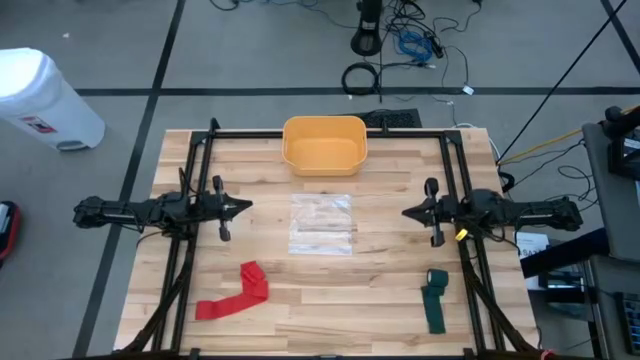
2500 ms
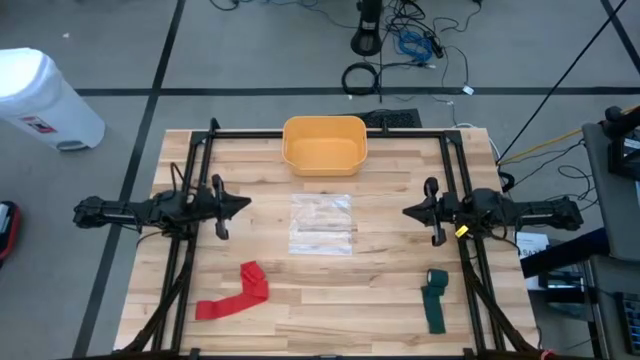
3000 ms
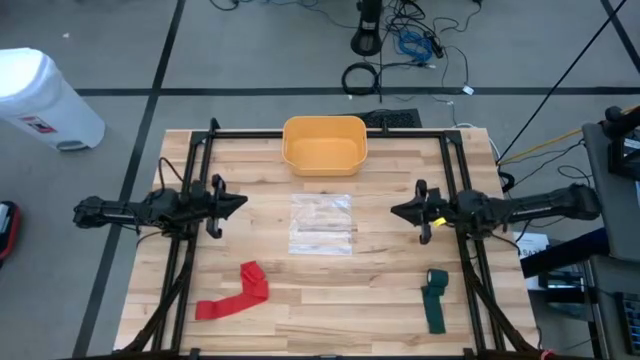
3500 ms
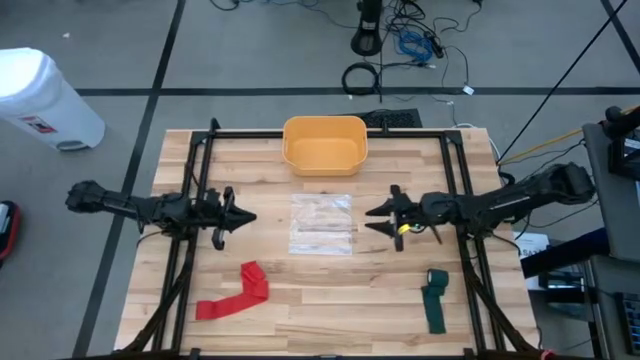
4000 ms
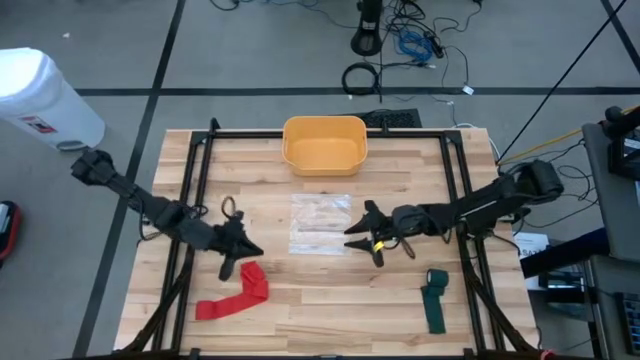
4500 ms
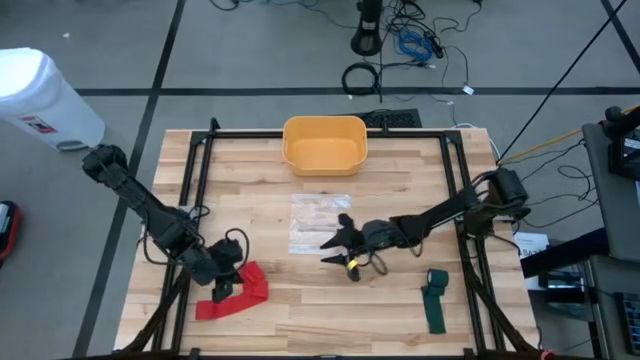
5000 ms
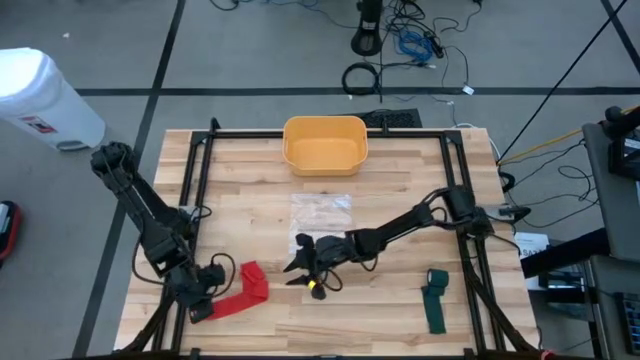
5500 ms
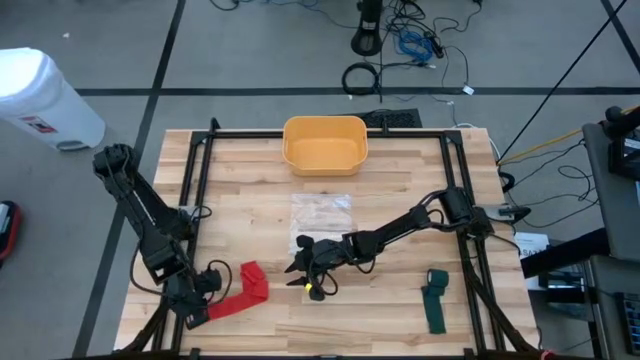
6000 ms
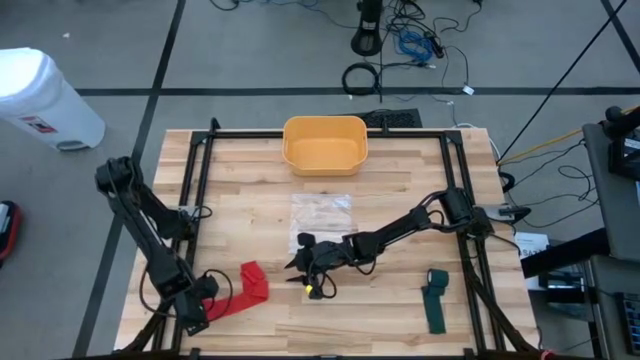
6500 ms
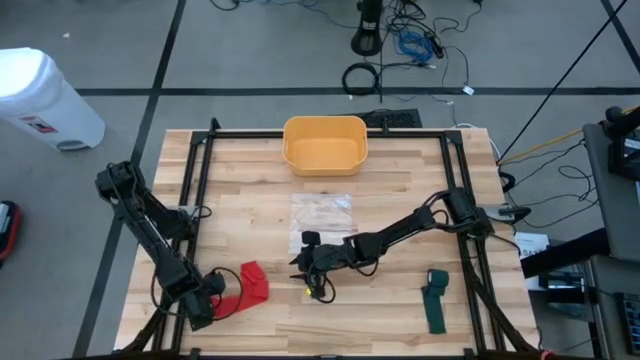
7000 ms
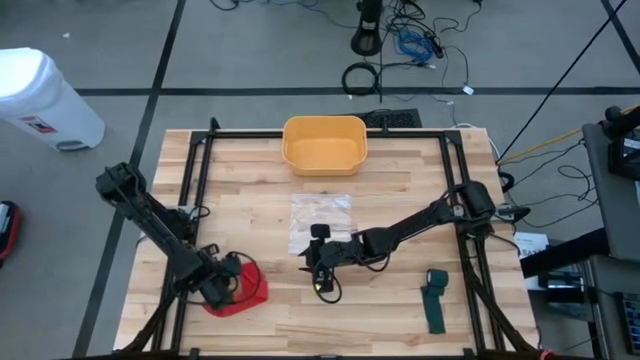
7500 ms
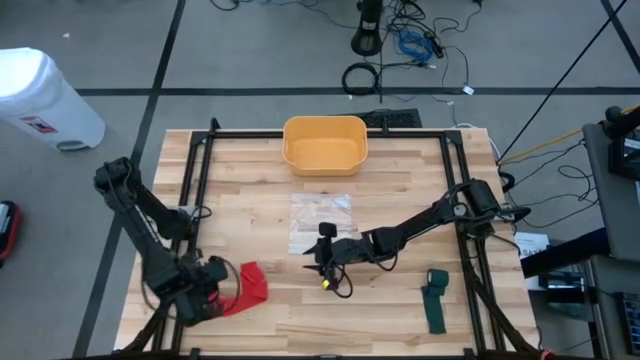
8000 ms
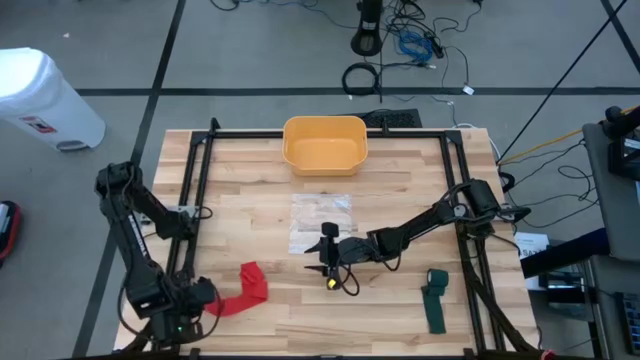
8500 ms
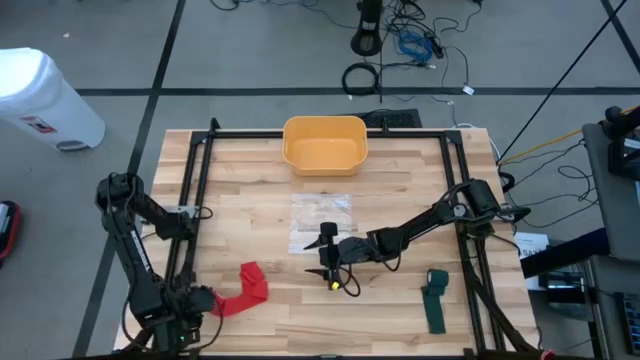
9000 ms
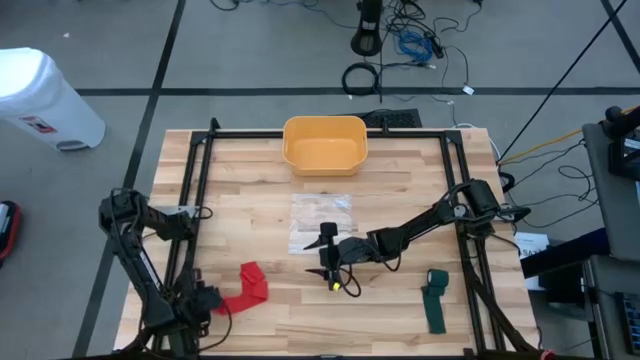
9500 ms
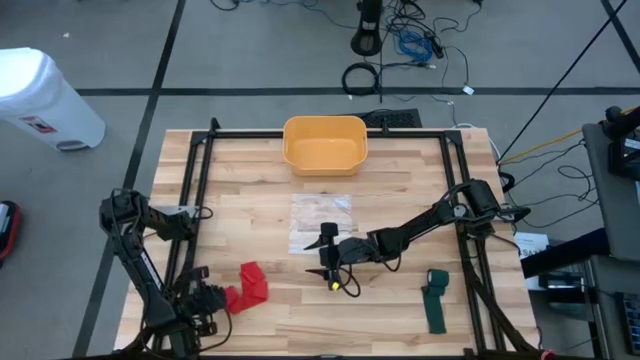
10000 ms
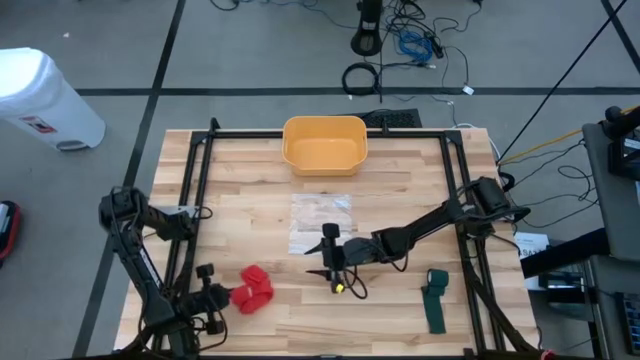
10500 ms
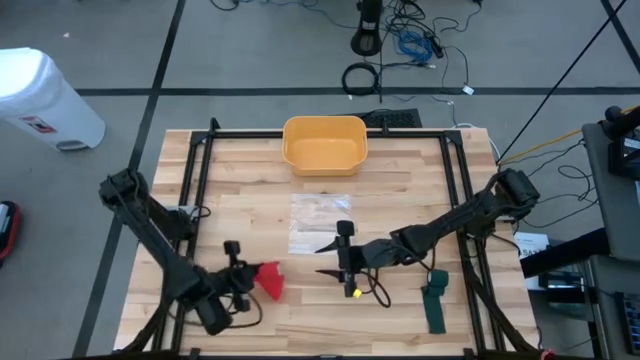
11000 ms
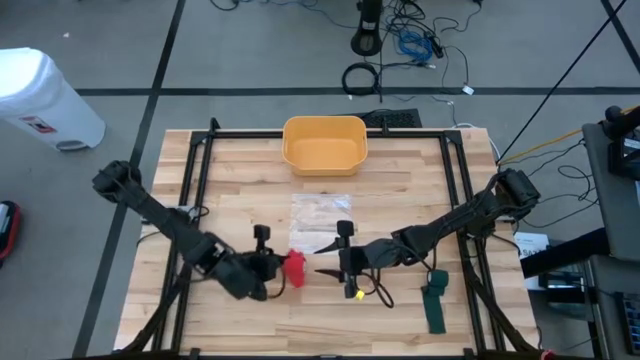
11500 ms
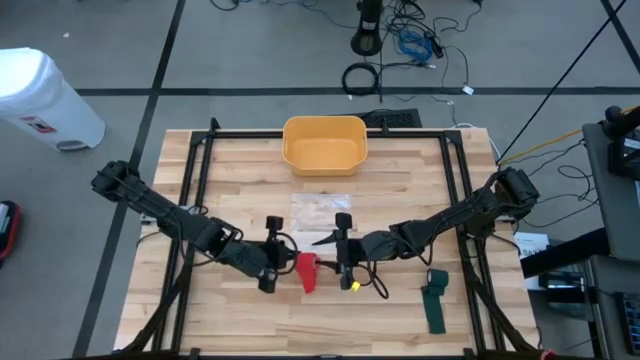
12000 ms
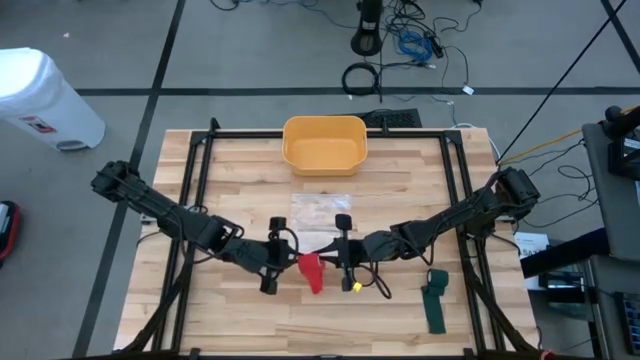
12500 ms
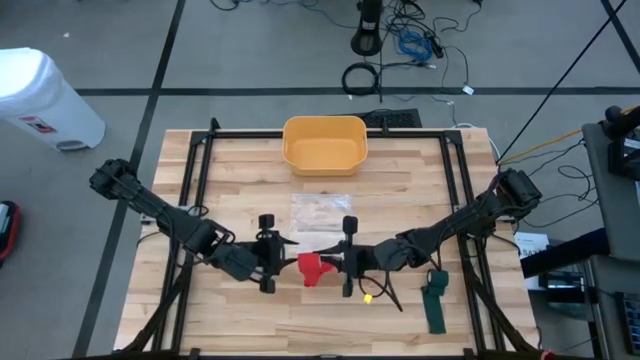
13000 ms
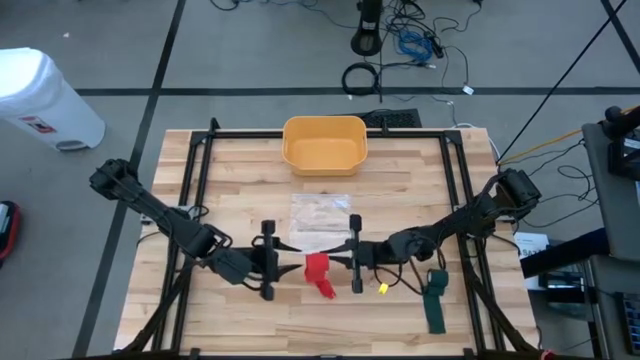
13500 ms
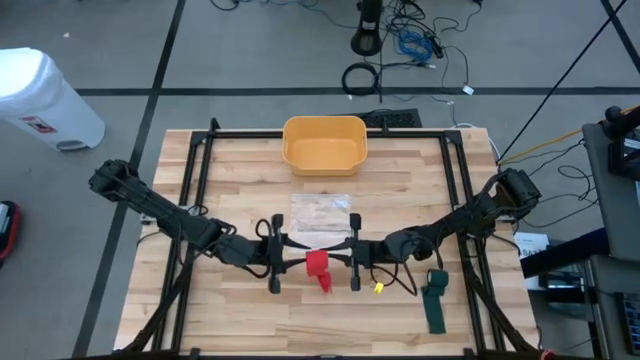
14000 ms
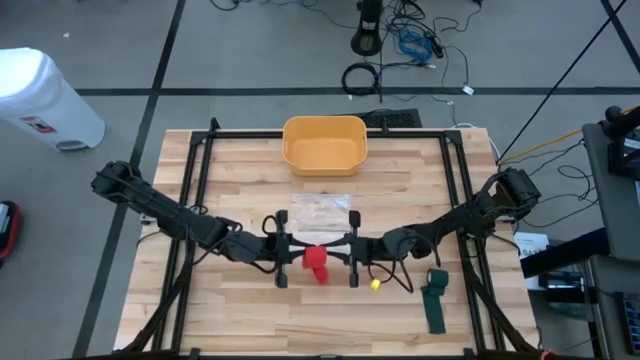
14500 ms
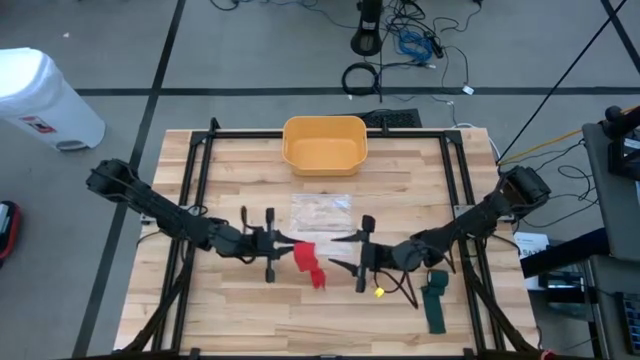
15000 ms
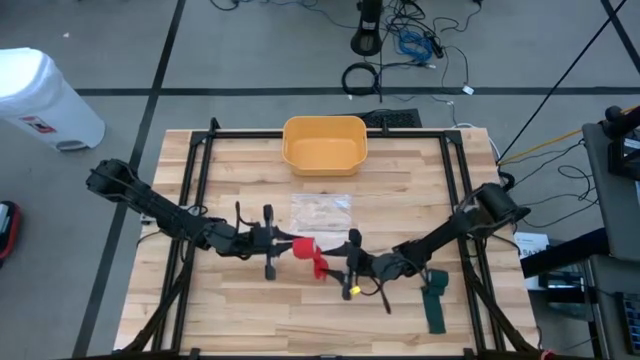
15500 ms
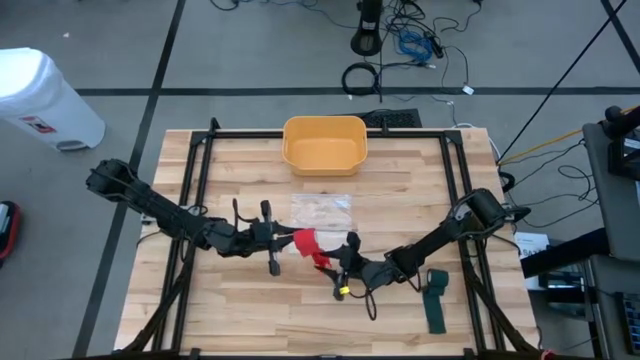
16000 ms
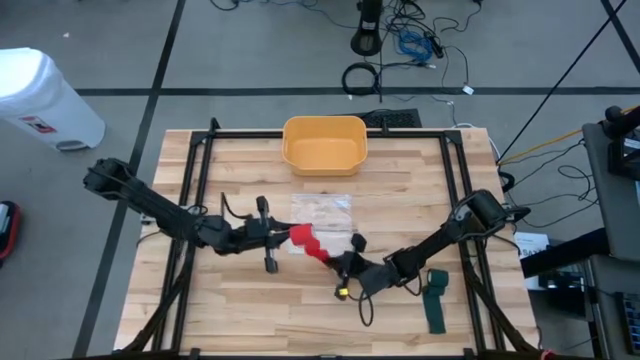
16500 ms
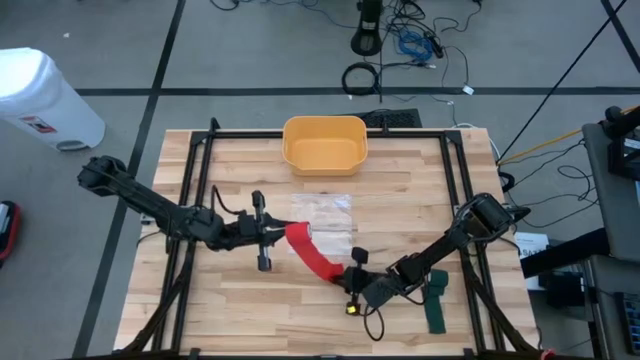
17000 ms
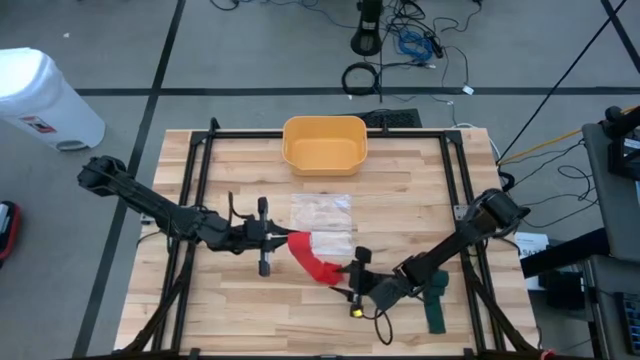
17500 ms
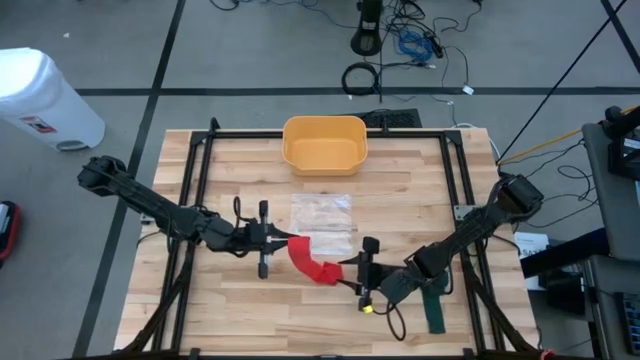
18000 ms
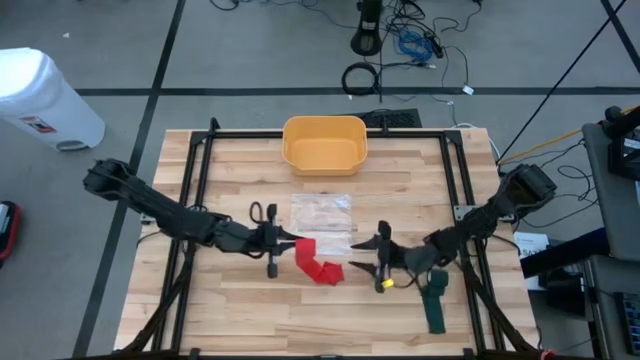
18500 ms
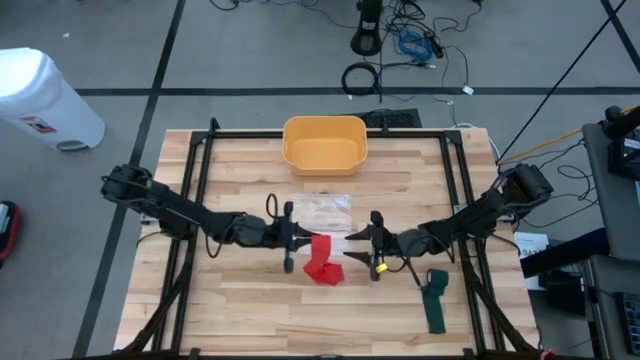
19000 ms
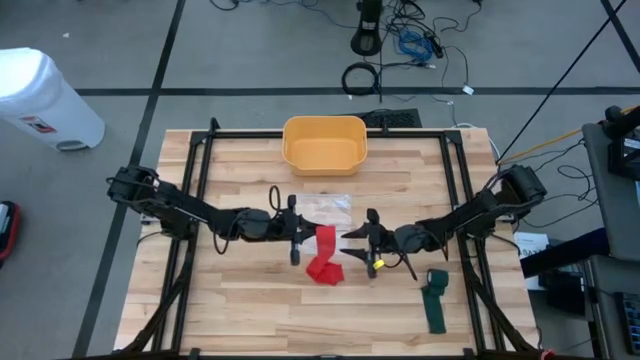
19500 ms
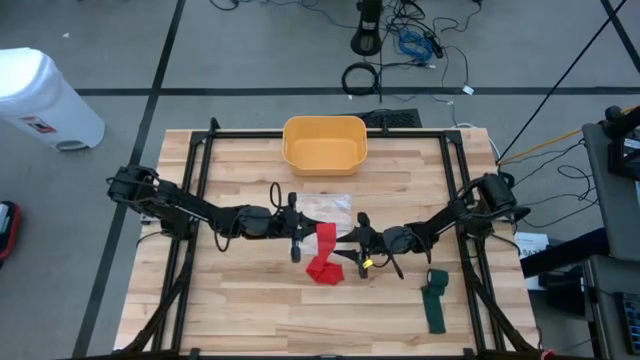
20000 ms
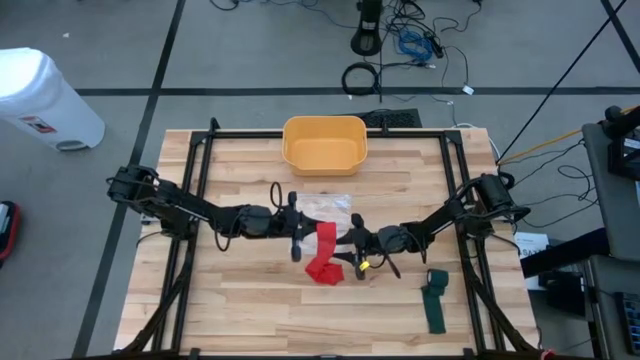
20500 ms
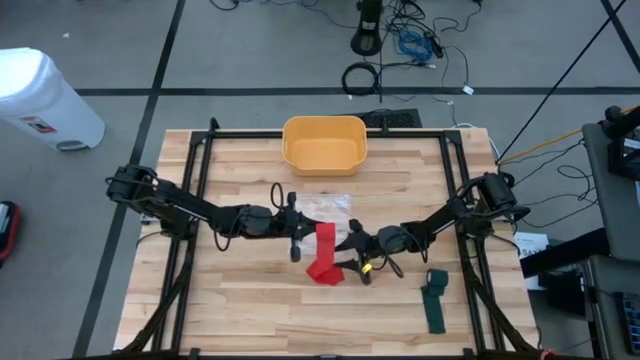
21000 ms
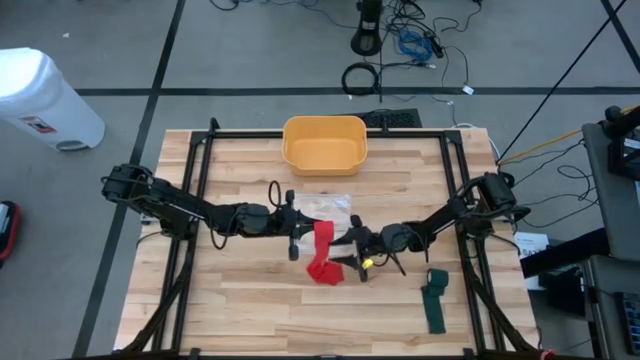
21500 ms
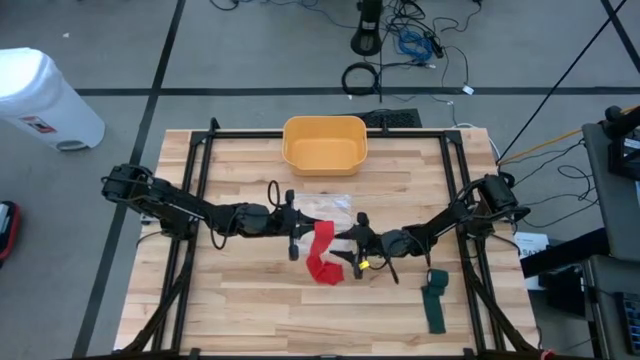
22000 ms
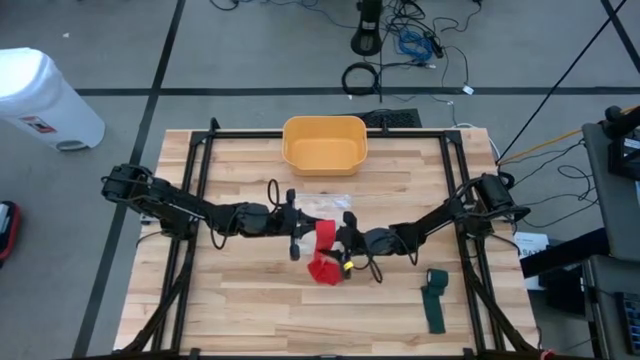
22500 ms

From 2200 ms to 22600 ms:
Task: Roll bandage
Roll the red bandage
